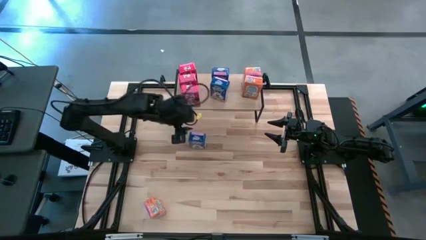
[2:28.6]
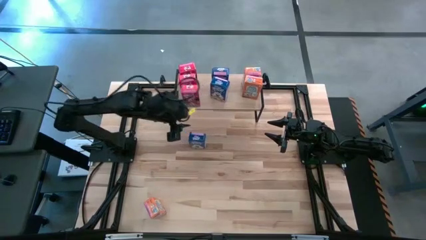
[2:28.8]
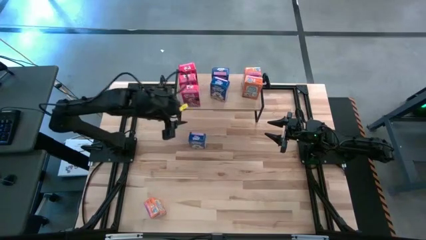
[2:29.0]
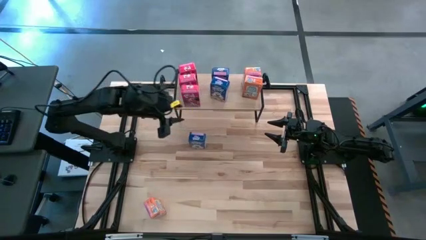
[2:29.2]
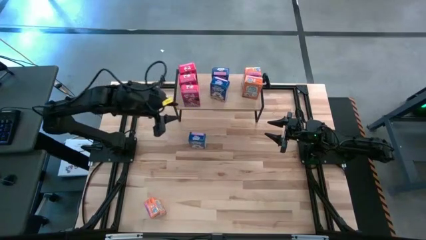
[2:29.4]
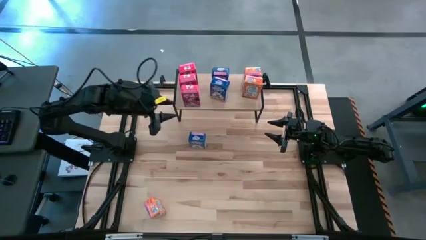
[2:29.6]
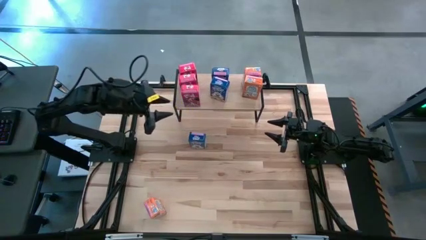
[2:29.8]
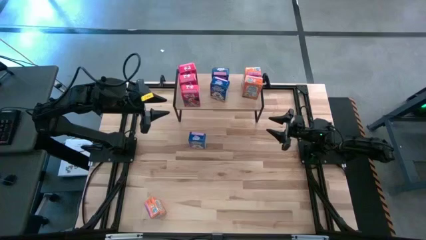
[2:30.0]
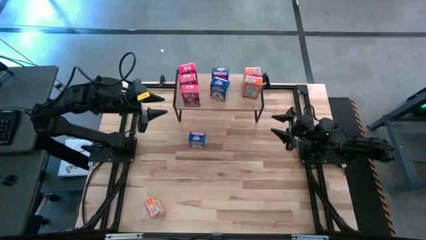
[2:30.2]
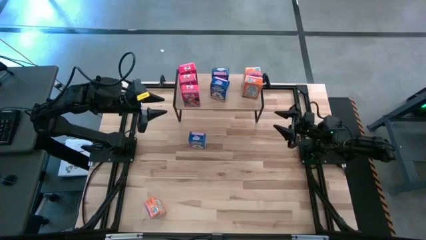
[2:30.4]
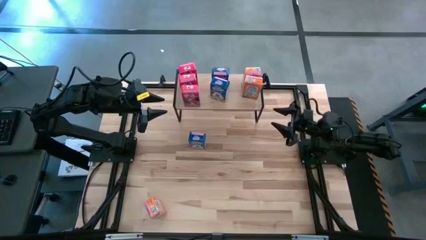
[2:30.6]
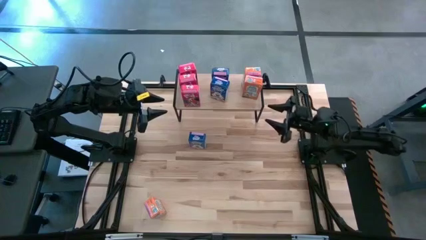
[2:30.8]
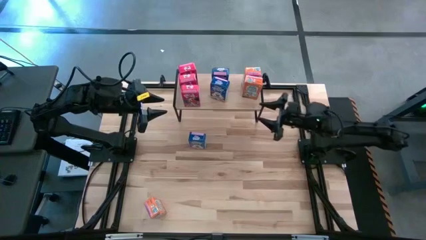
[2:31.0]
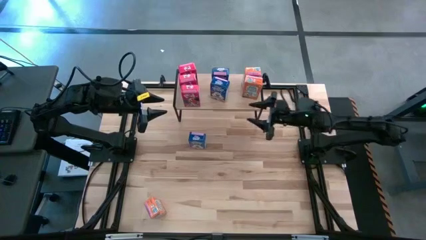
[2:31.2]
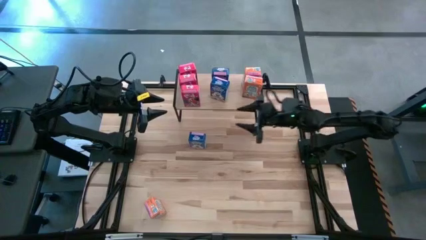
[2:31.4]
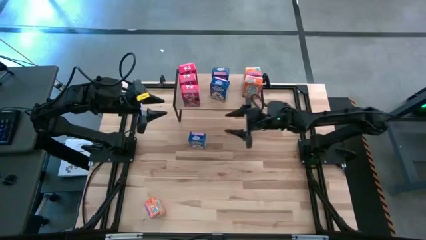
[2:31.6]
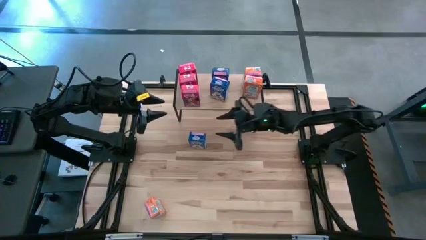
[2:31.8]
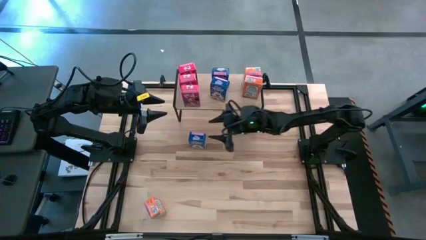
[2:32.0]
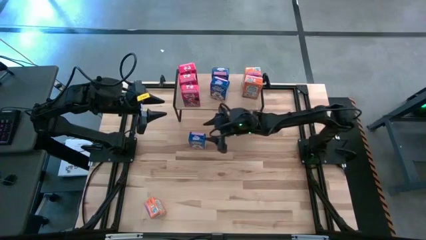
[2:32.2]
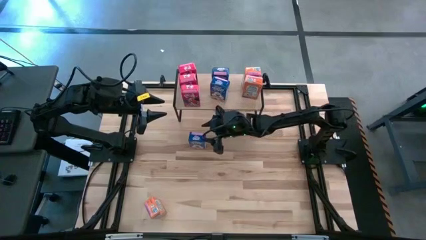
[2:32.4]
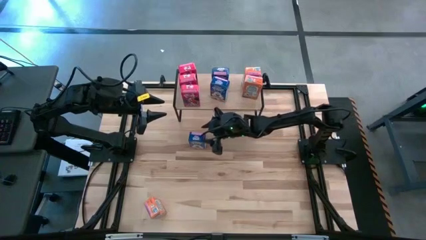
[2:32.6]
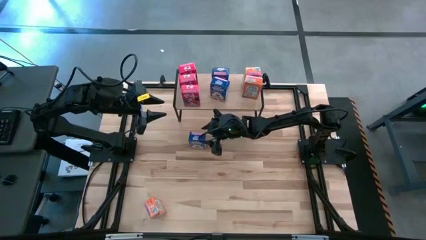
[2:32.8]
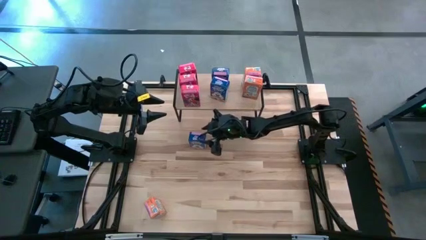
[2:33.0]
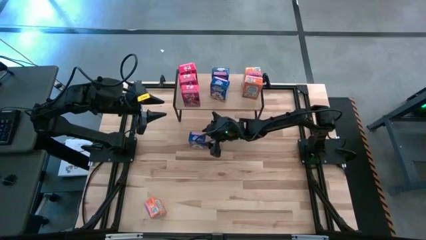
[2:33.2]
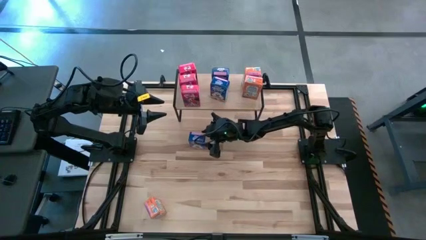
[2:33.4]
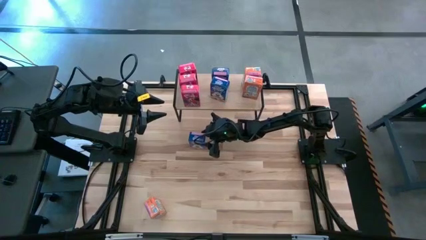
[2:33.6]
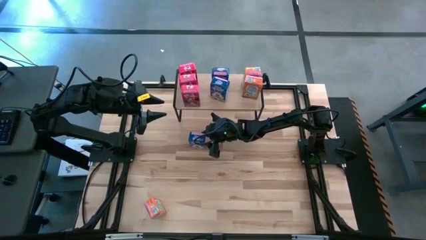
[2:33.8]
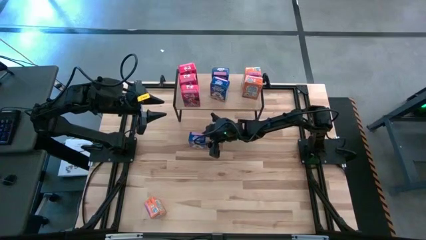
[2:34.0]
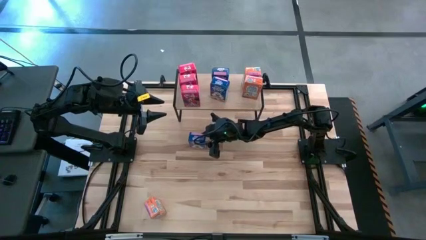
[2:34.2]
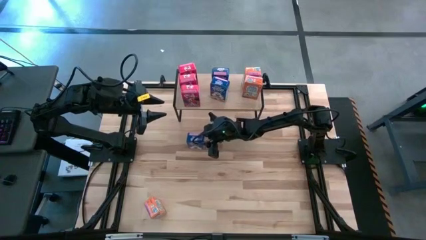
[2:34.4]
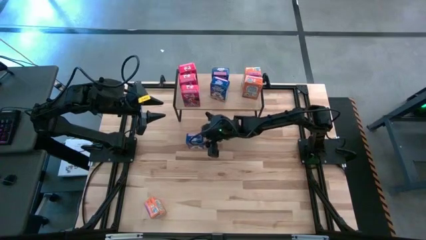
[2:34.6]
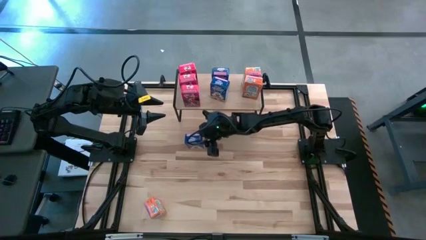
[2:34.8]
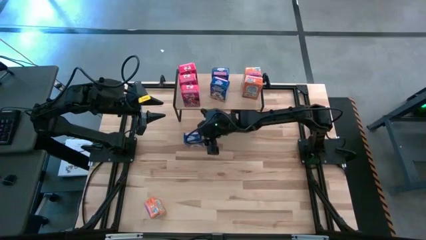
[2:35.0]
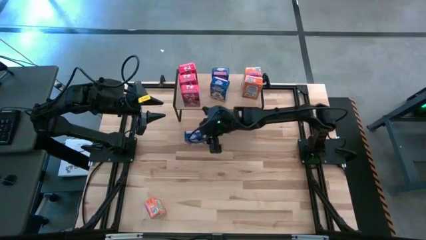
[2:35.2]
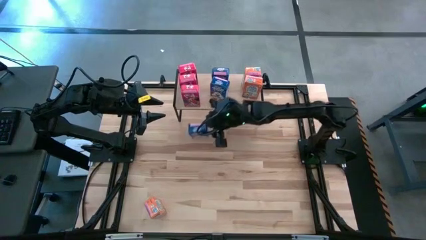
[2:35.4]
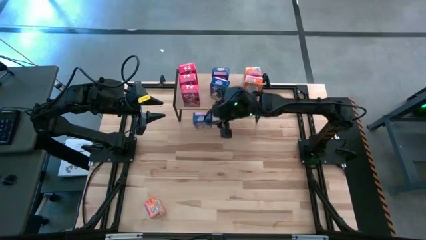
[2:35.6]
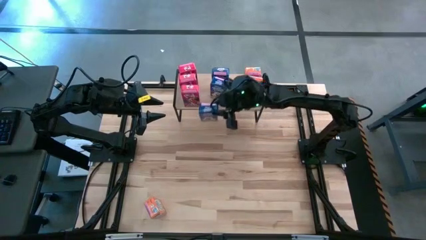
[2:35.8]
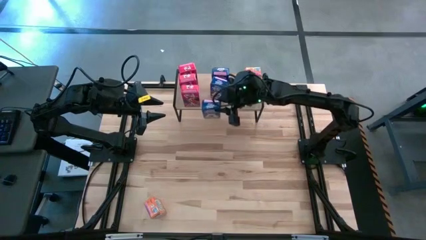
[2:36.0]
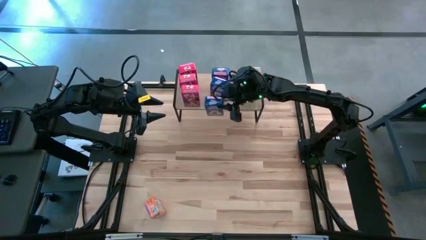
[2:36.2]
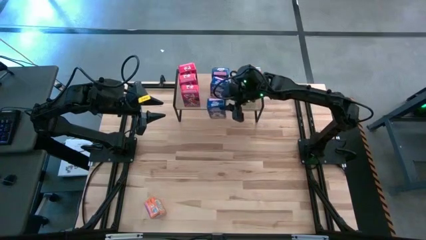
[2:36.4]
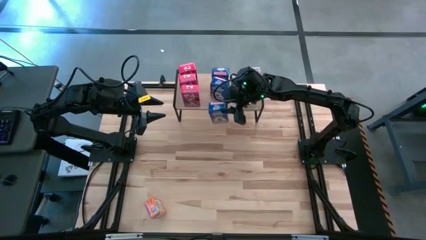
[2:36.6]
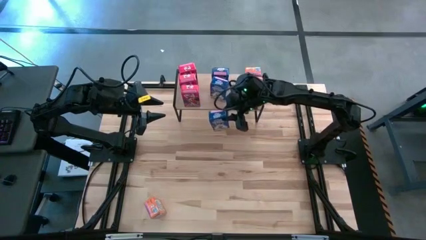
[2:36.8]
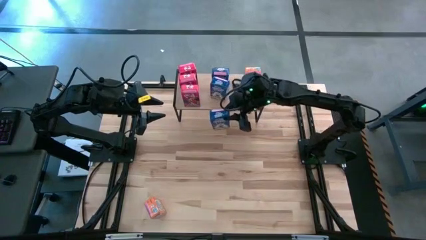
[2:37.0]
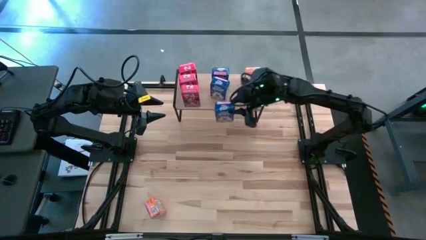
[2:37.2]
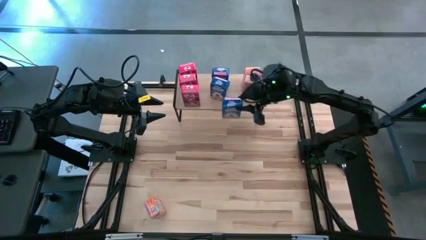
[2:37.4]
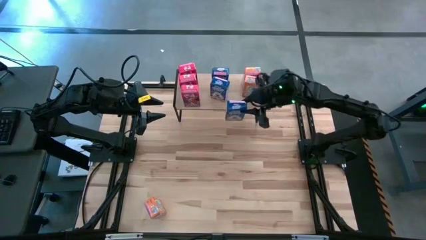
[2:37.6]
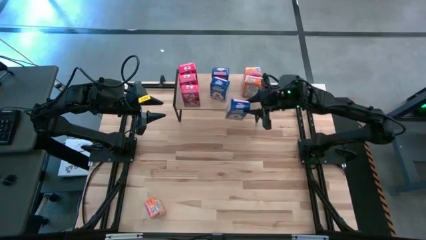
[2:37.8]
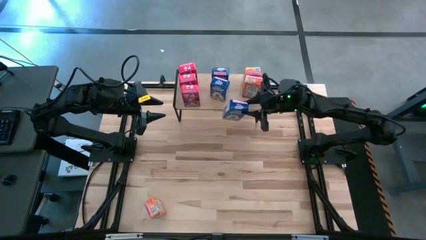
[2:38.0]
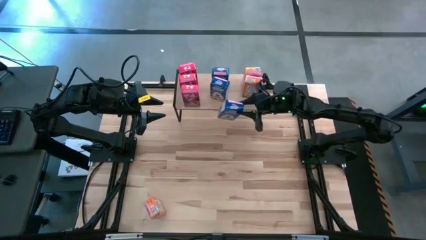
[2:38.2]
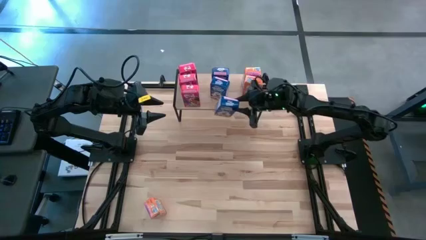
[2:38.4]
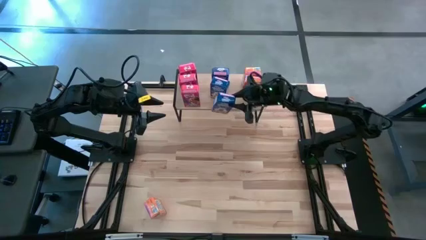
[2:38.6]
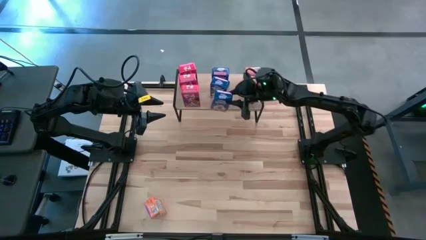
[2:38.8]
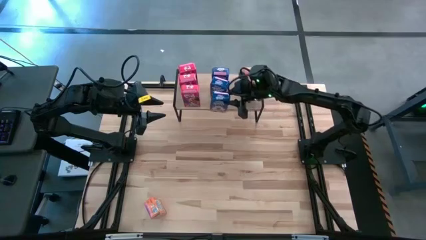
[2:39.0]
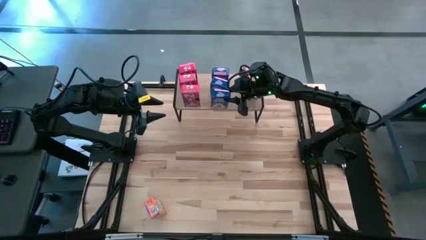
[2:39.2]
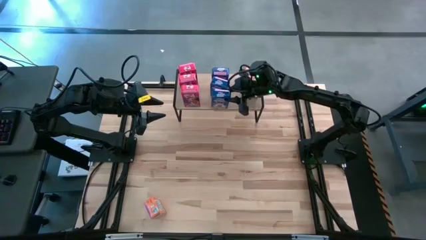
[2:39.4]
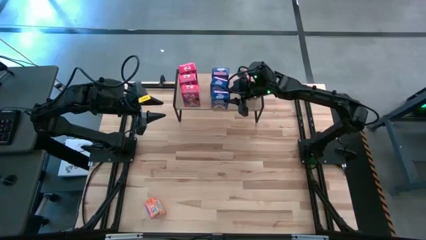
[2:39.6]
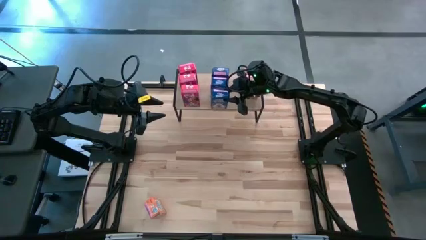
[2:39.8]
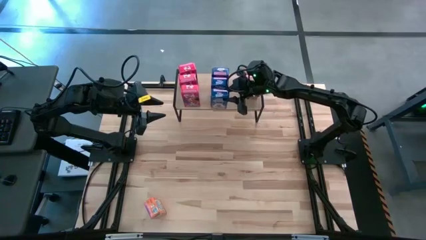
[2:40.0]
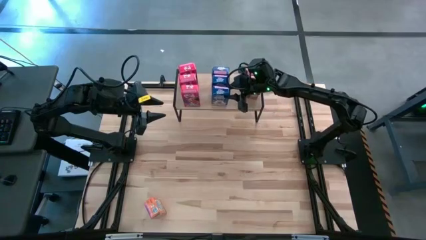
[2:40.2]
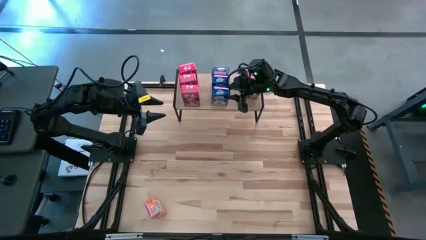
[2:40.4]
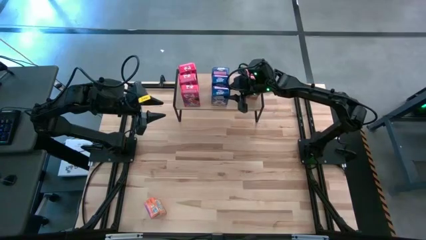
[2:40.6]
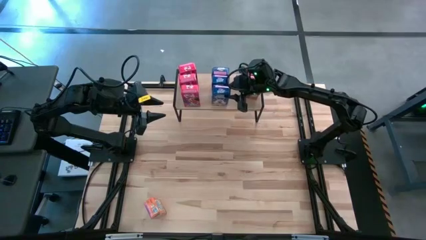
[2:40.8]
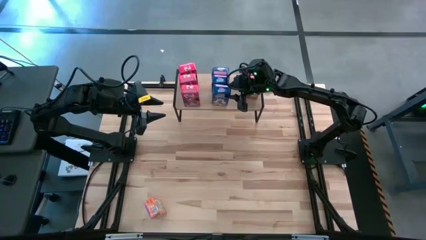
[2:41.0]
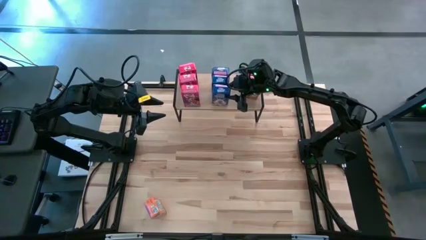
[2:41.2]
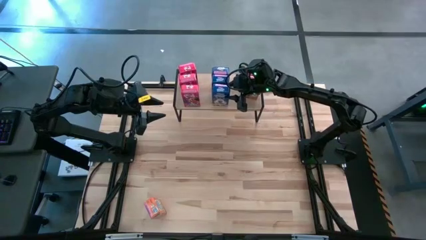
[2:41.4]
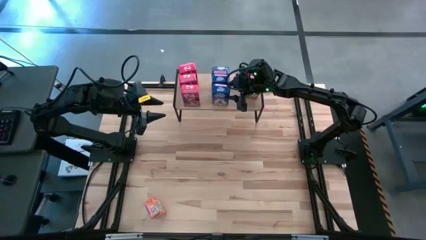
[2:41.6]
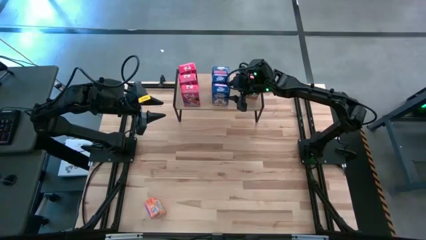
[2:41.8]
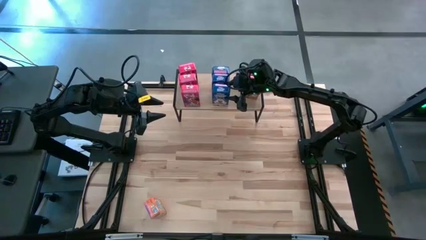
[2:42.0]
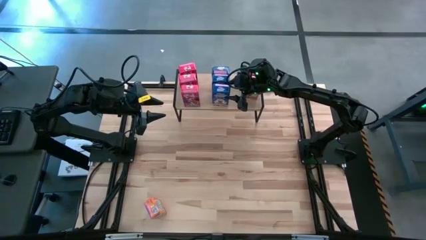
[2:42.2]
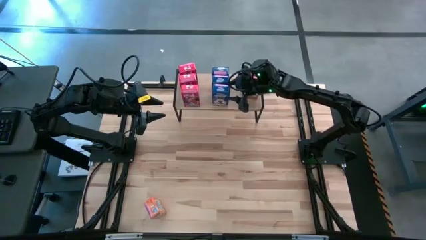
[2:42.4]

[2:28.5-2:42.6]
Task: Stack cereal on shelf
Put the blue cereal box on the shelf aligned with the other blue cereal boxes
